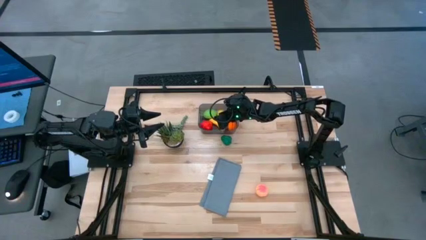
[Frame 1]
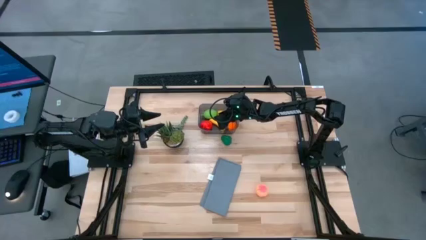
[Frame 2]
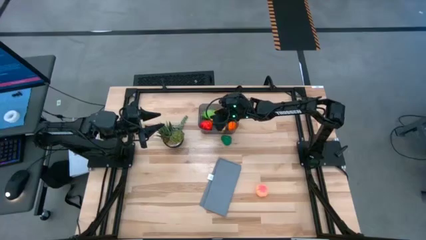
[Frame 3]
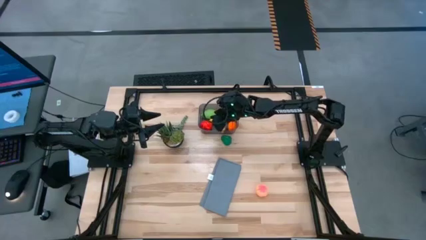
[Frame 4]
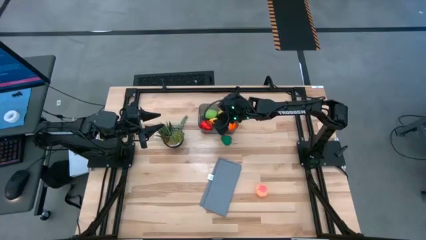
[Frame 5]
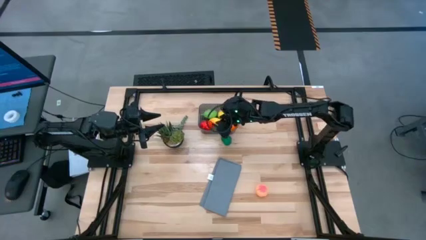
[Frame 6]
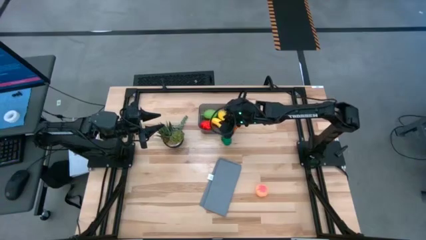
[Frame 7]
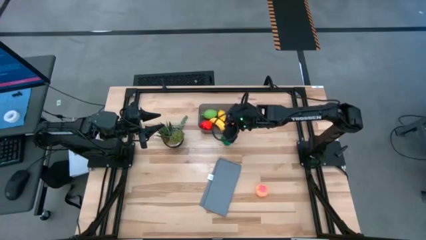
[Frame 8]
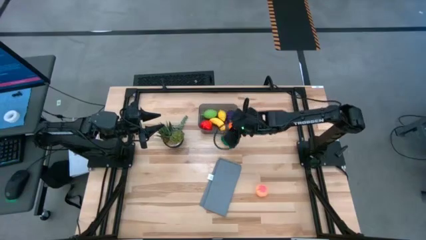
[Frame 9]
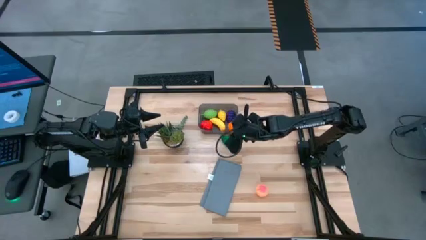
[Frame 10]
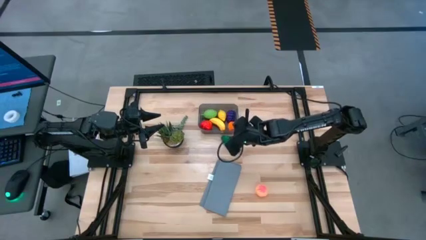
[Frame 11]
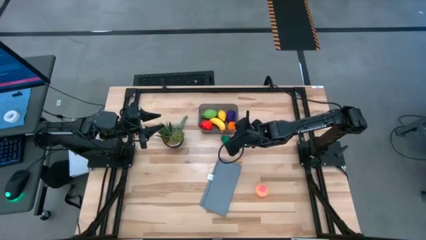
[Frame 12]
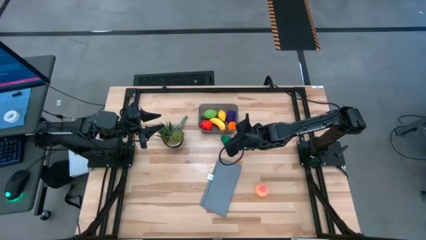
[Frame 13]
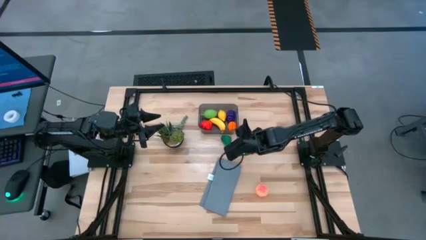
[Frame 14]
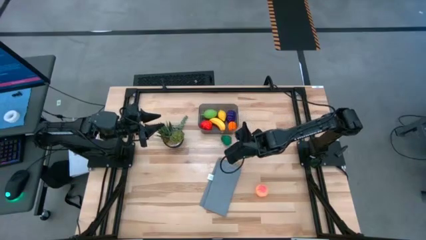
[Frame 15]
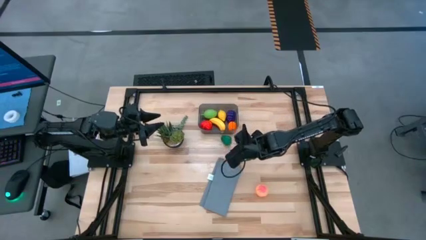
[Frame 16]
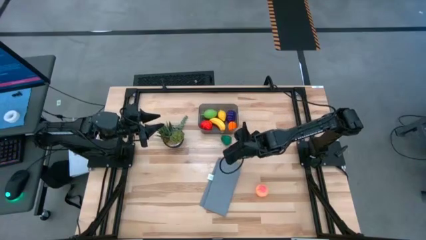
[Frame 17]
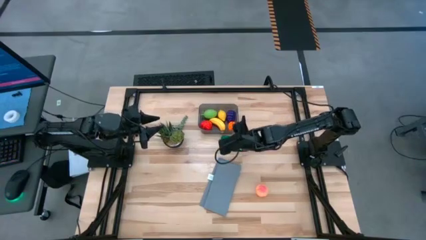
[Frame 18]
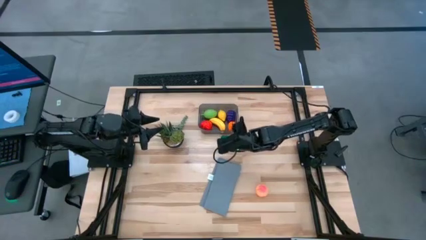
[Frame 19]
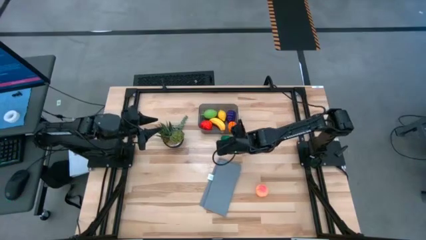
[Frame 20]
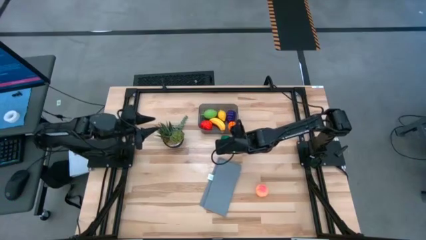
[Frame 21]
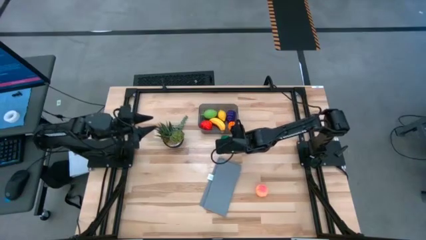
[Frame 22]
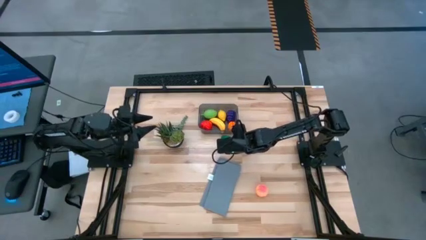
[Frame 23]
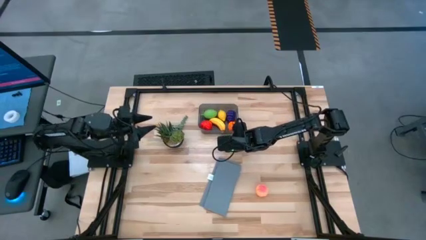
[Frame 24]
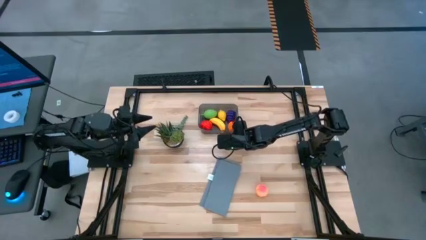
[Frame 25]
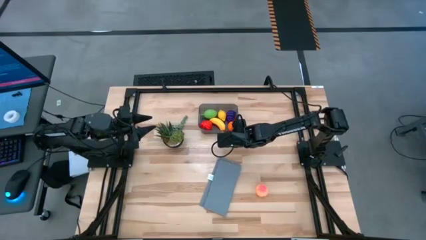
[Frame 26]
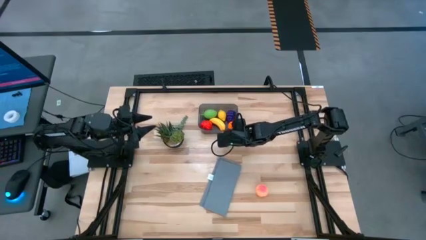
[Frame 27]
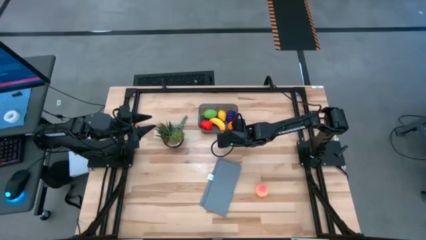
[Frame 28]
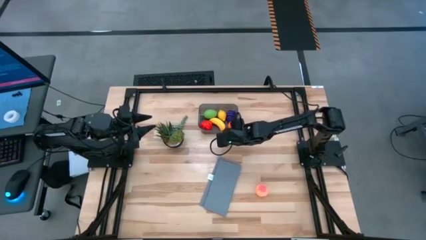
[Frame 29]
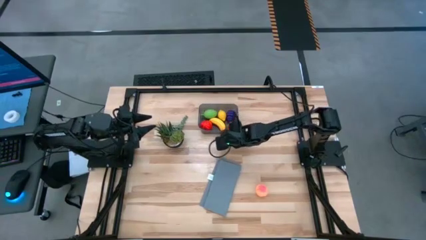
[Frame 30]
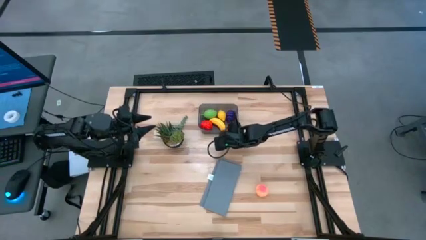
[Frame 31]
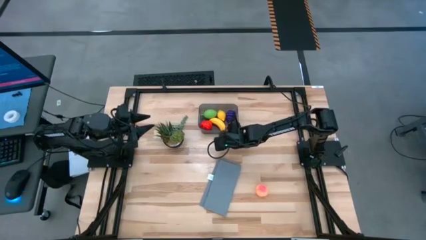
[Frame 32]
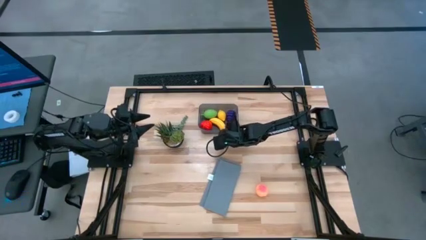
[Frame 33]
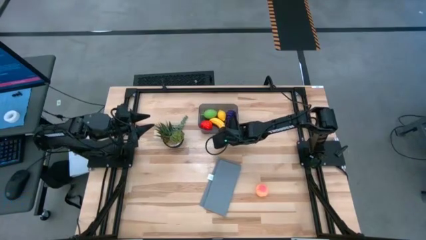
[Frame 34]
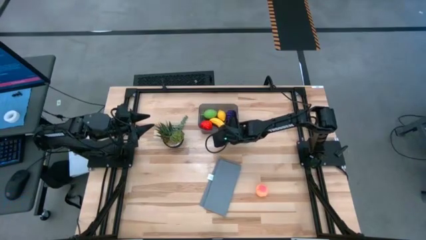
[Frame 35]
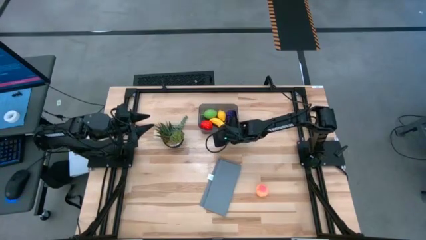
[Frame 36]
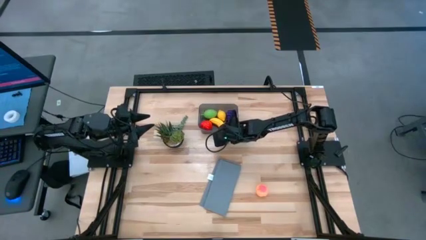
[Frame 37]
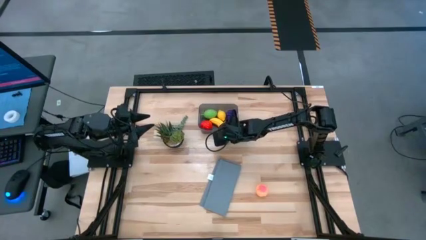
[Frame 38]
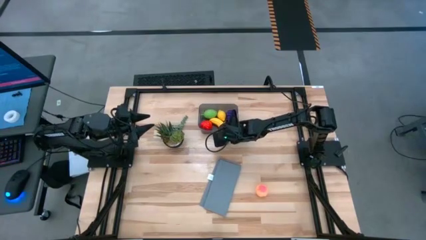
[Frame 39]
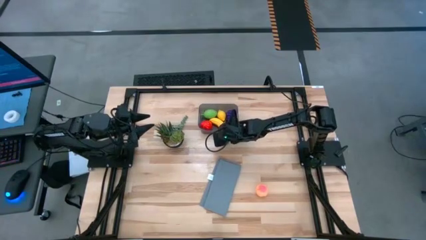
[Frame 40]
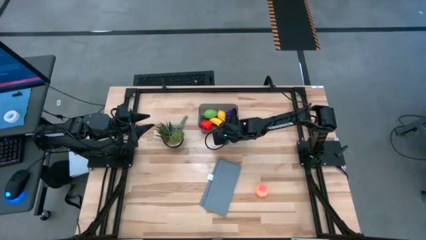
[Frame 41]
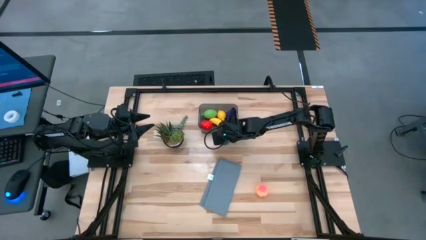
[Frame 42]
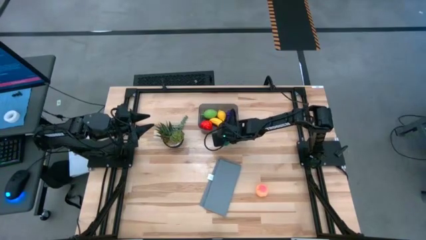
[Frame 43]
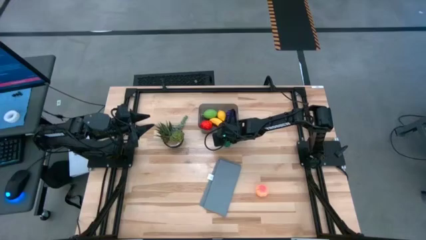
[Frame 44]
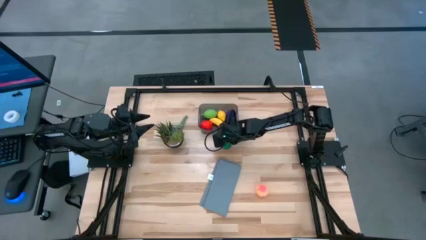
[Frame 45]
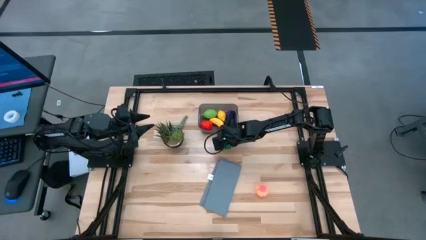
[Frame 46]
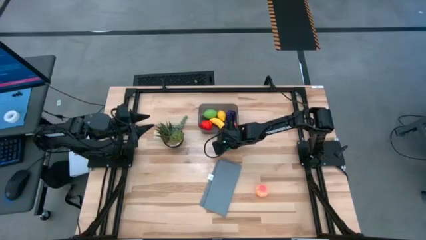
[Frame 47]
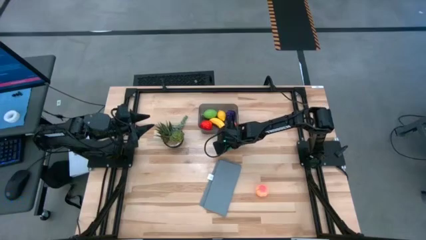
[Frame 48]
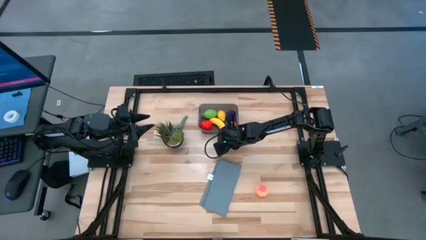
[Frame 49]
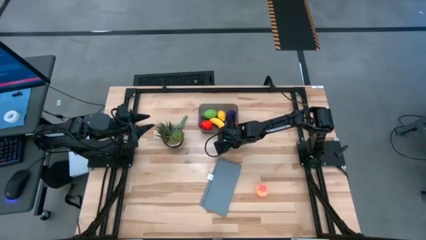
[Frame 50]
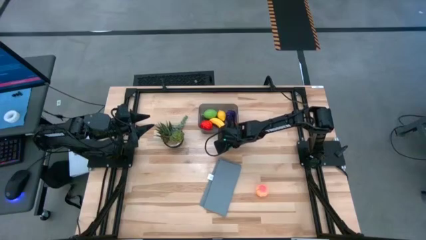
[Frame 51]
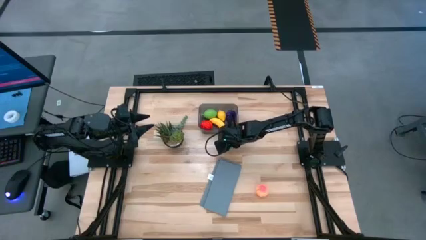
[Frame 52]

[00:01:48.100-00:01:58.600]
Task: Pick and placing Produce into tupperware
Put the bell pepper into the black bin

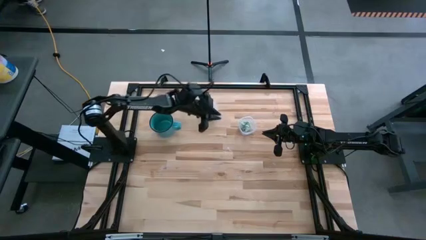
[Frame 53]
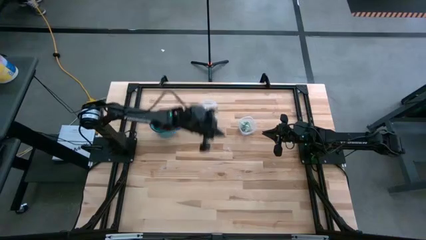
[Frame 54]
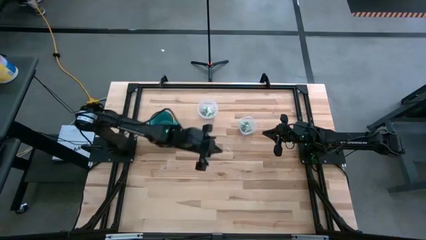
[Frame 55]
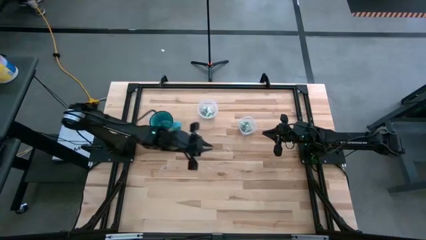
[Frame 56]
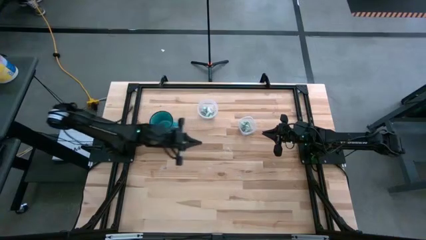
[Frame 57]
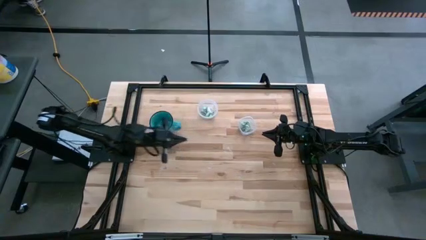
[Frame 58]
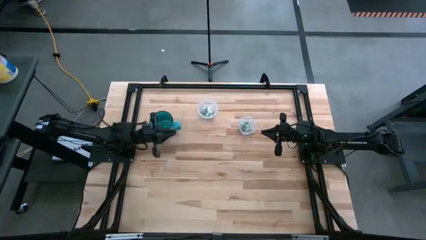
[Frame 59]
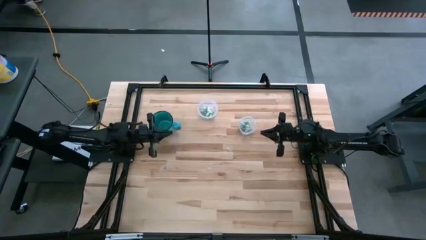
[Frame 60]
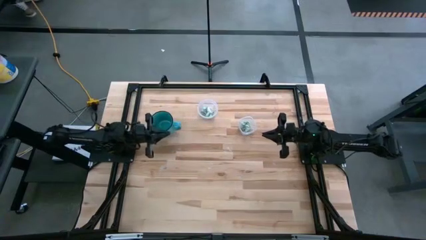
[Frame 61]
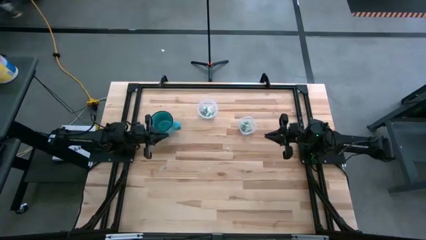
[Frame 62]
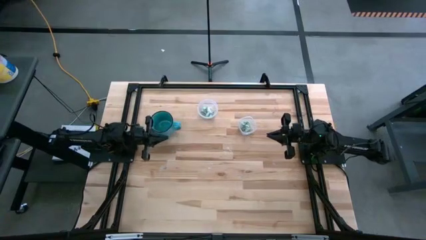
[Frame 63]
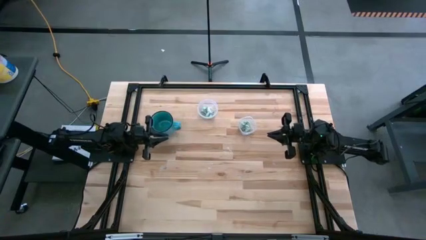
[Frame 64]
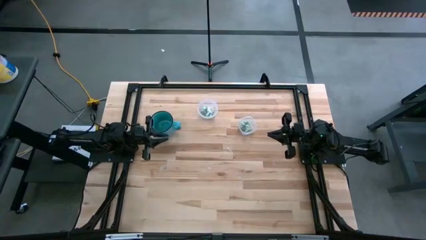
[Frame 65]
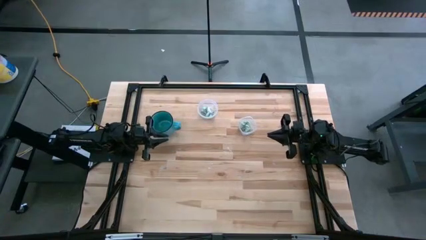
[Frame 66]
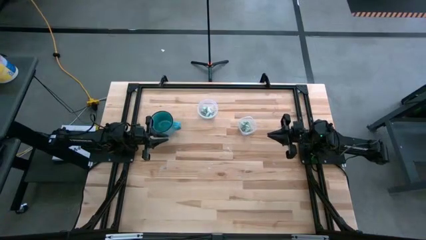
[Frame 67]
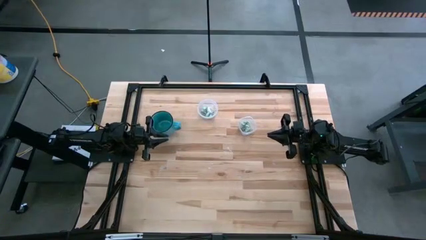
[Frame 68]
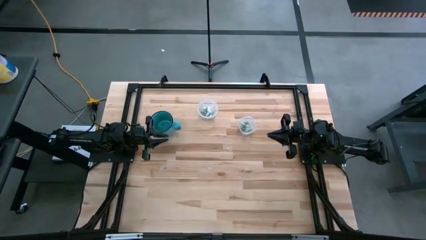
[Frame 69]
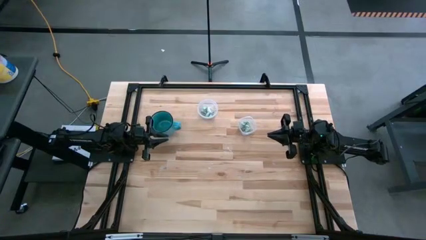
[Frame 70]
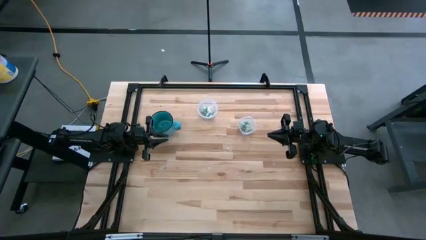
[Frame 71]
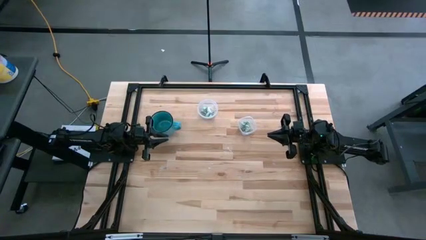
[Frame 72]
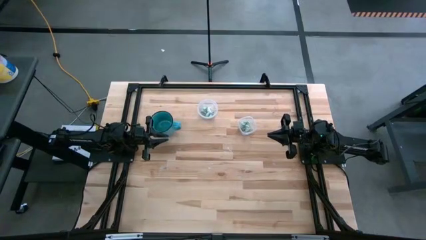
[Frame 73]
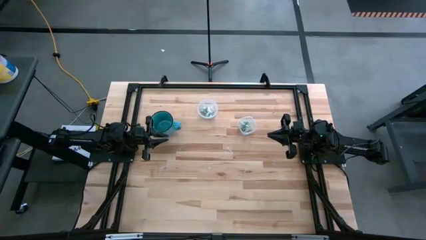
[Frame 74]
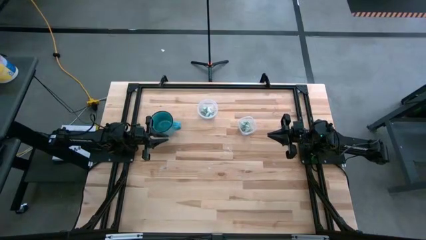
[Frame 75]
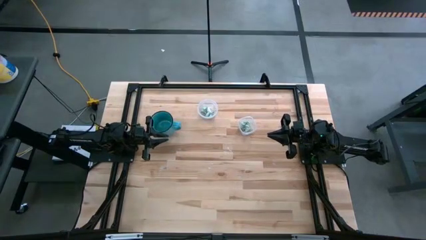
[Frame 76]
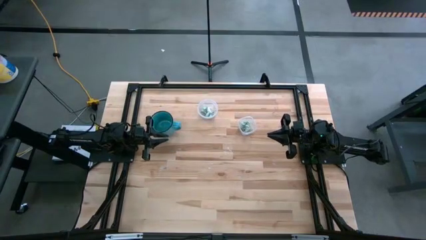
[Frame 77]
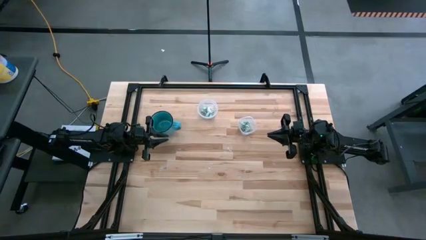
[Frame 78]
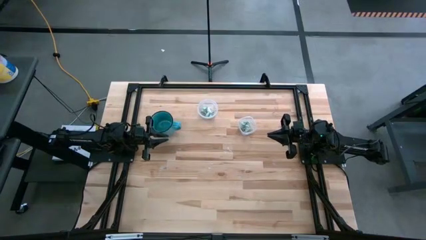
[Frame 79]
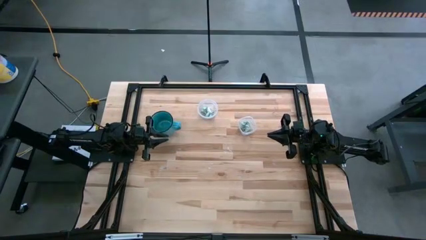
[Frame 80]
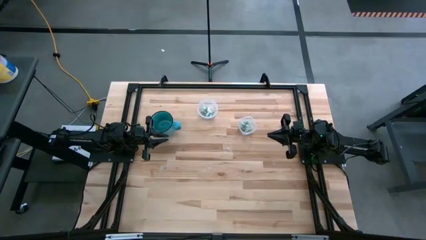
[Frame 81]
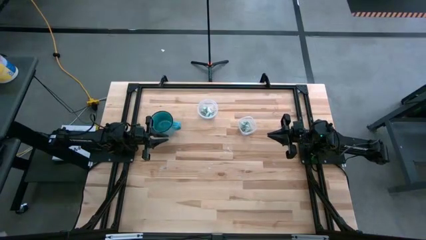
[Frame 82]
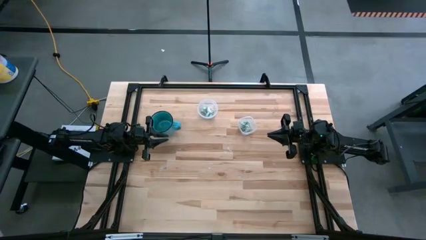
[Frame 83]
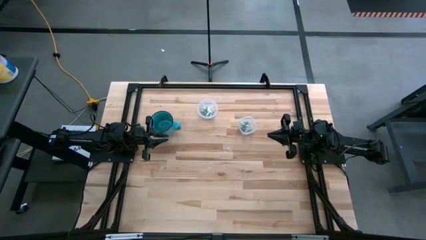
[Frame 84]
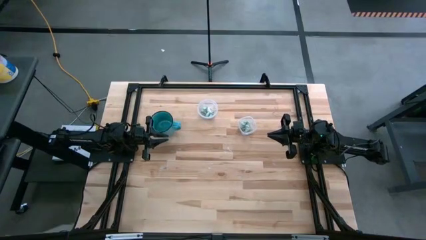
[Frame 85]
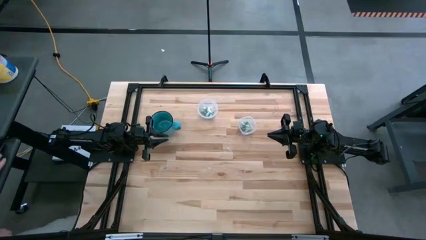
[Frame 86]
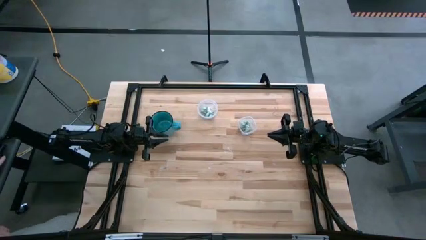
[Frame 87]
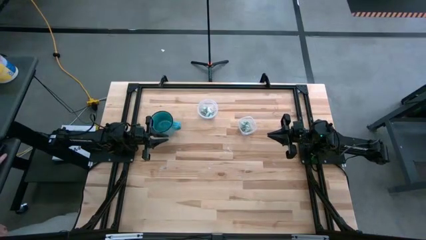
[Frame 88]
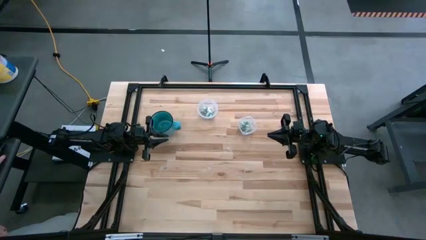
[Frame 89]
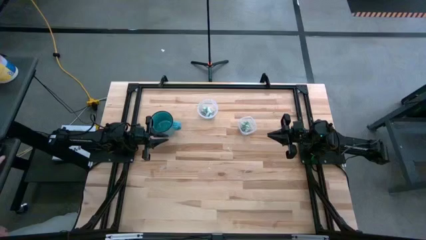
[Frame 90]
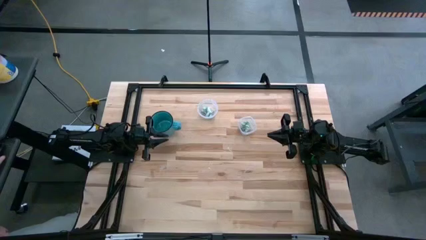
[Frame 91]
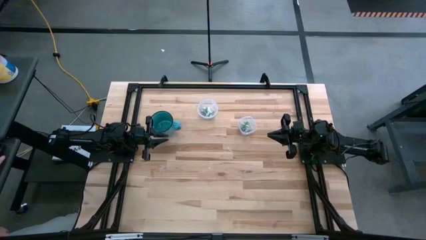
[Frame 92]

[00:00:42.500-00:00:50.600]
Task: Pick and place items into bin
Return to Home Position
